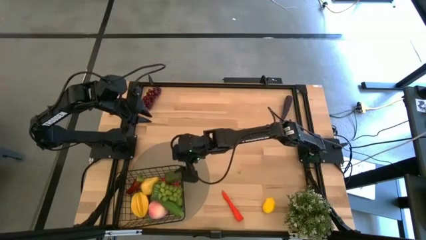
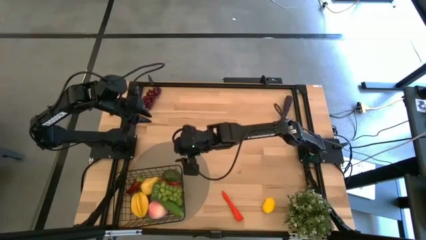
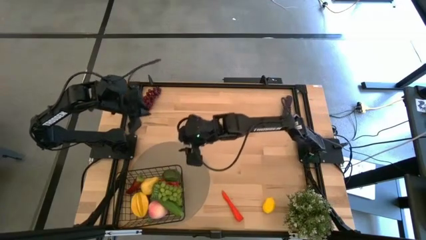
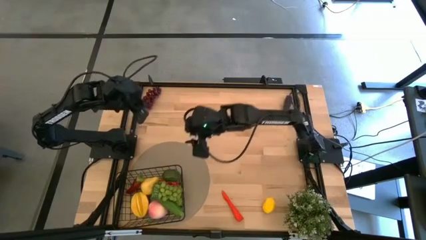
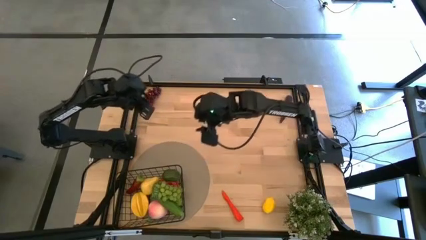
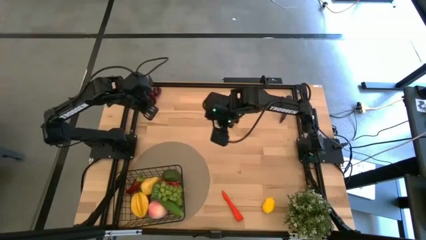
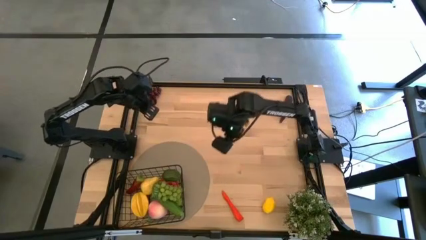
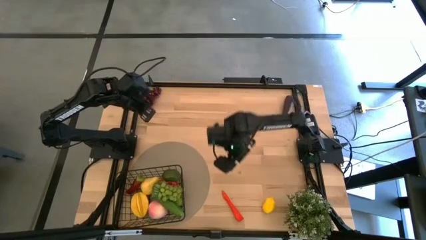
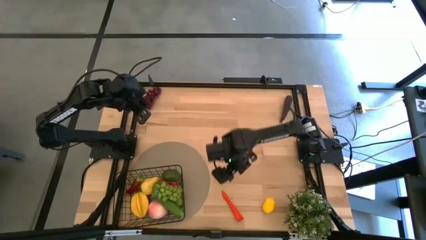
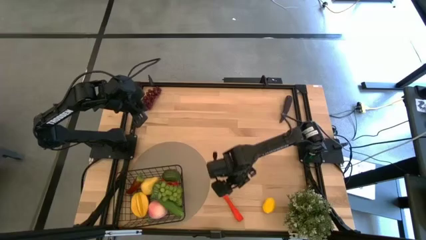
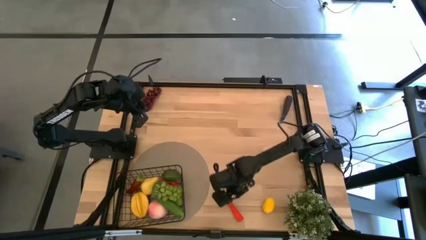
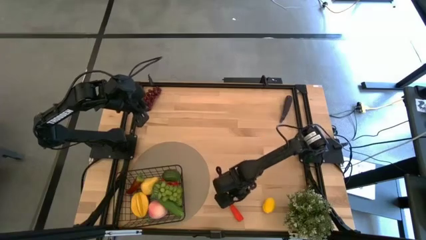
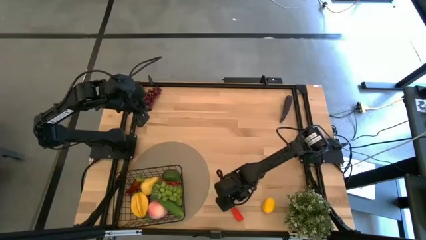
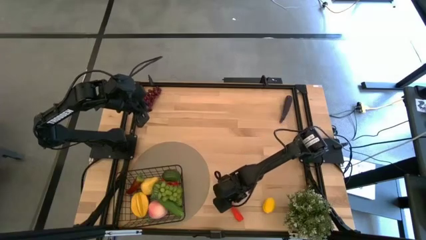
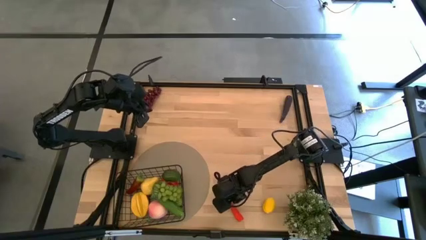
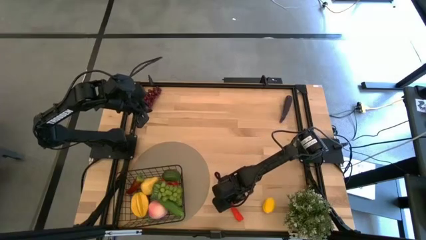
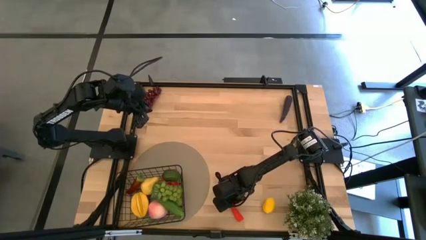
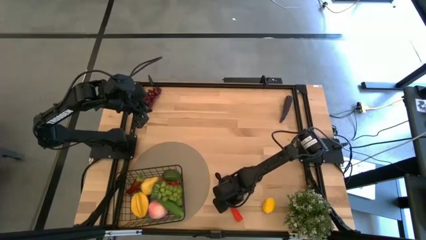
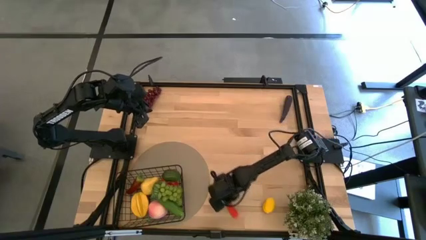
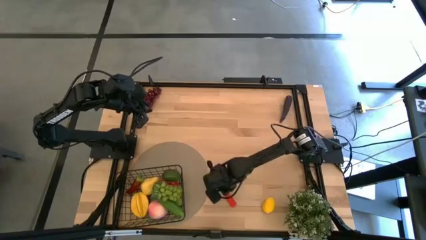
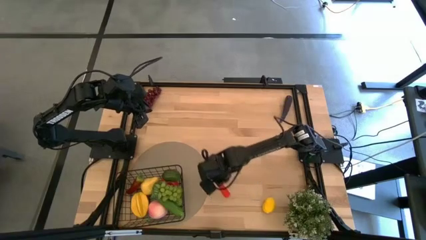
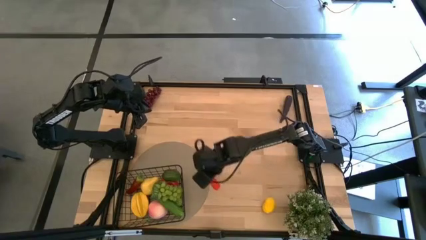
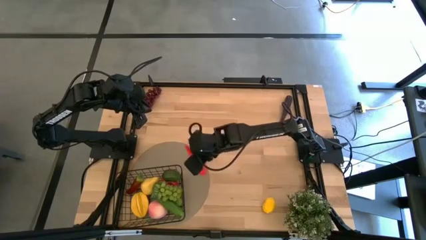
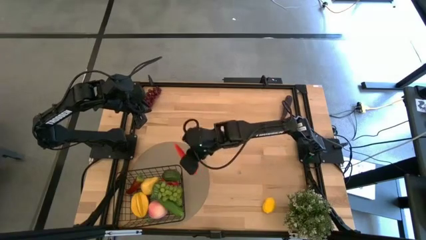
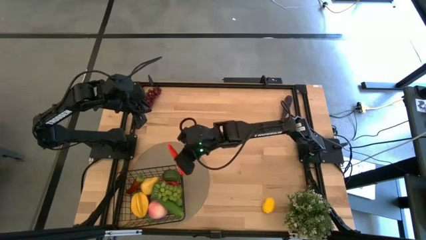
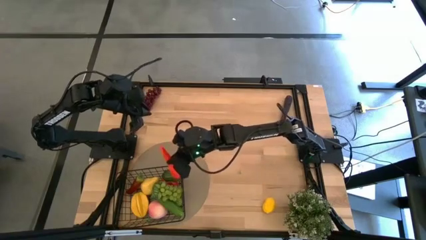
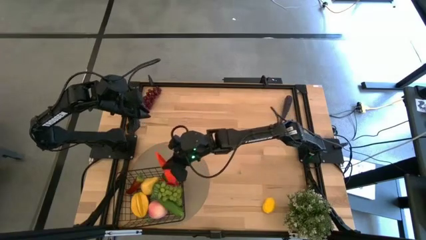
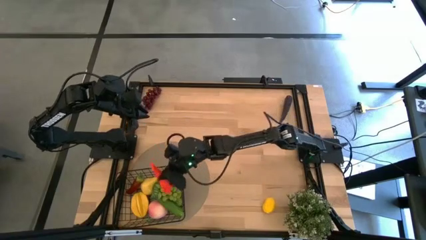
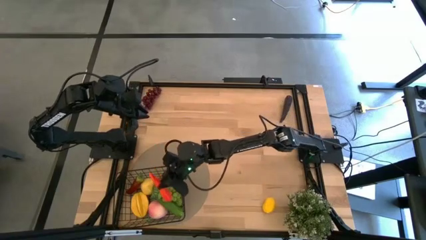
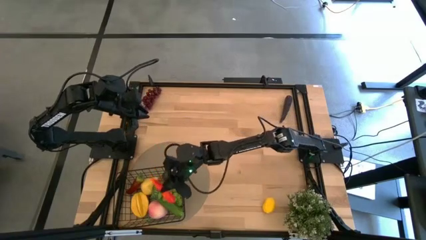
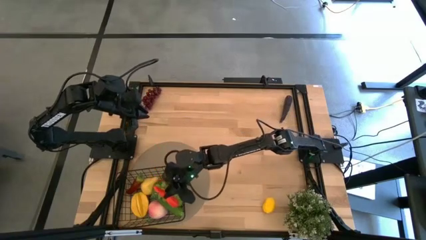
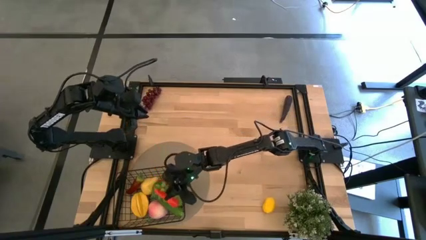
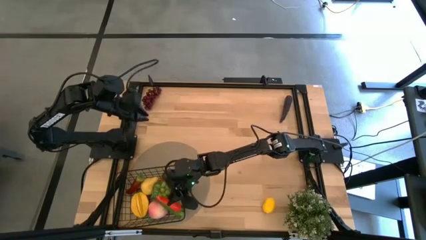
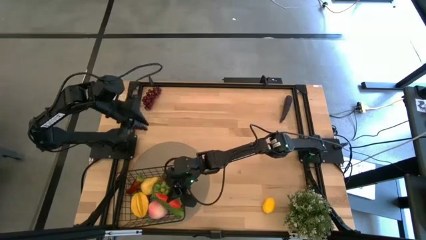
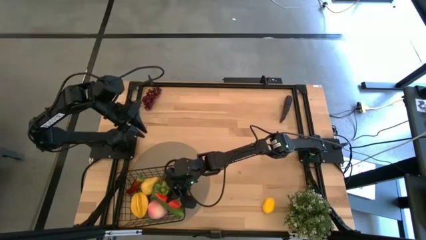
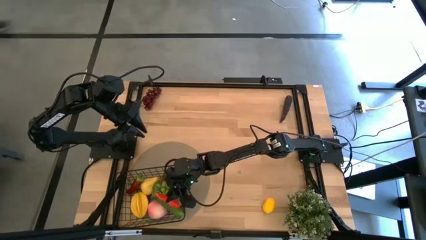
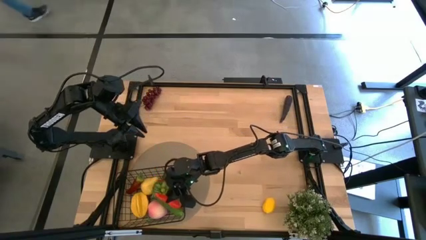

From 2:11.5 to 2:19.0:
Task: Build produce basket
Put the orange carrot into the wire basket

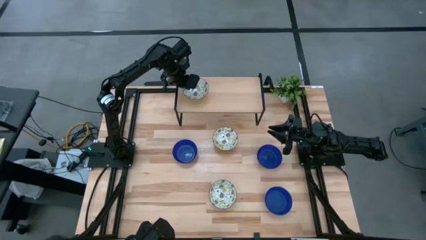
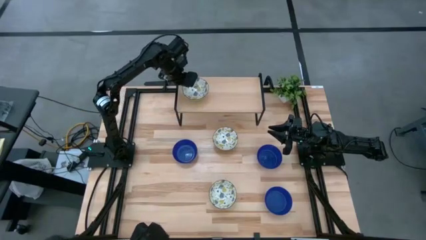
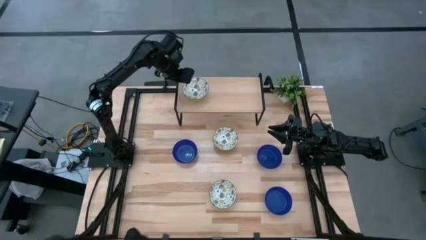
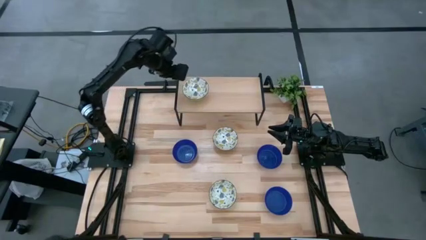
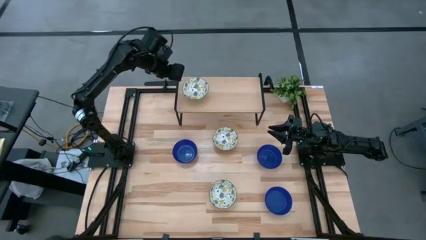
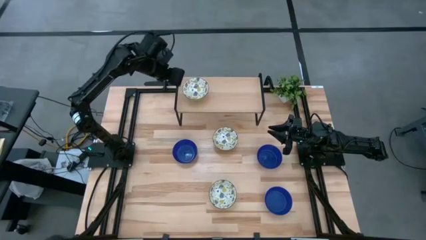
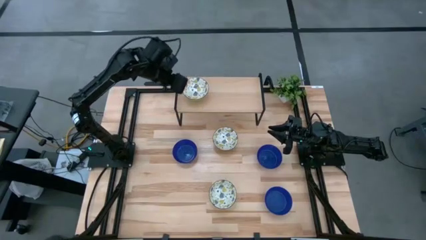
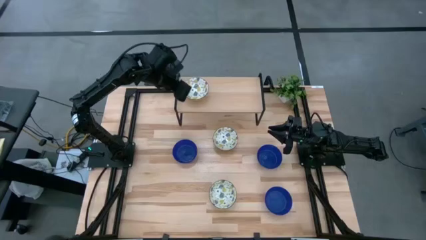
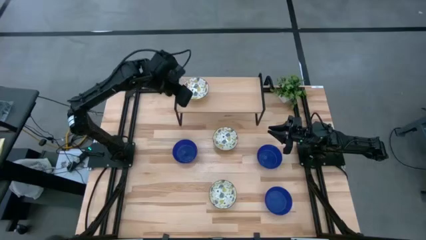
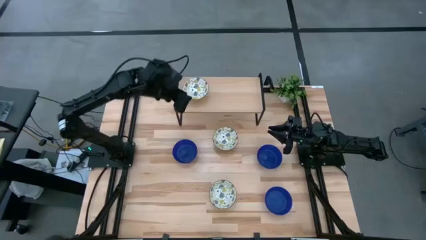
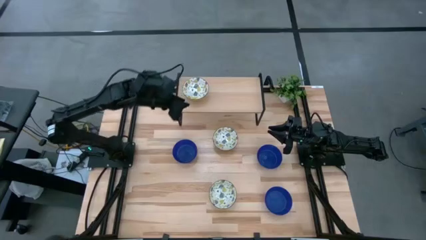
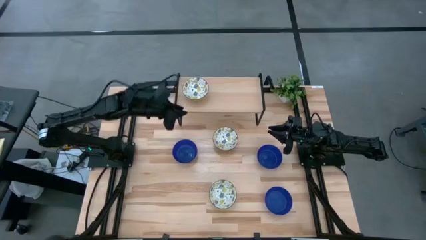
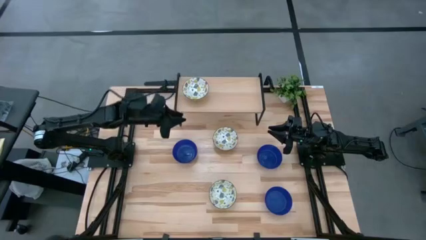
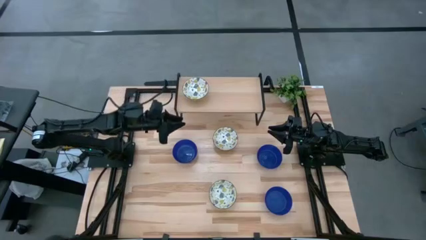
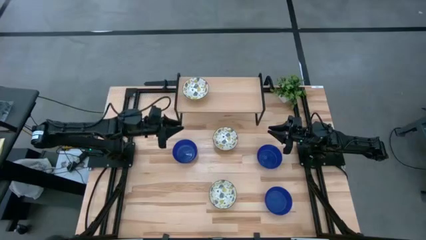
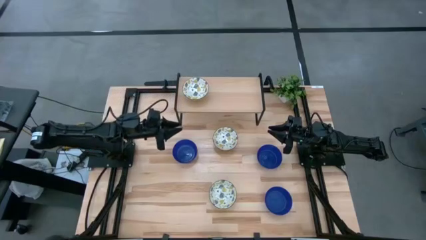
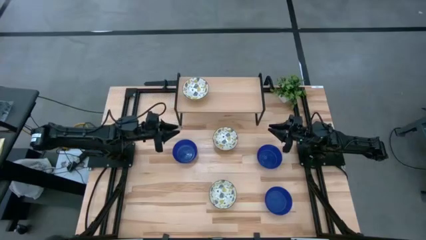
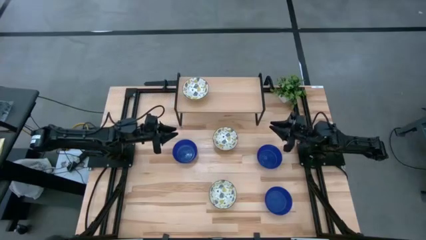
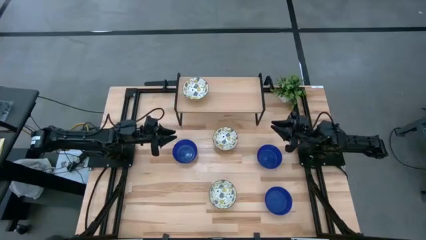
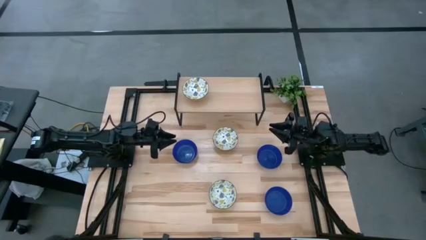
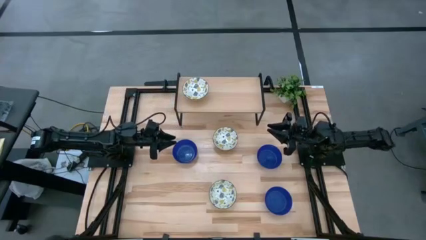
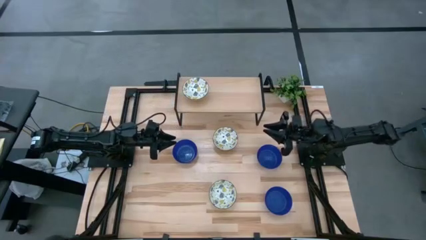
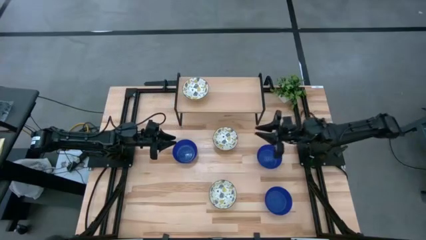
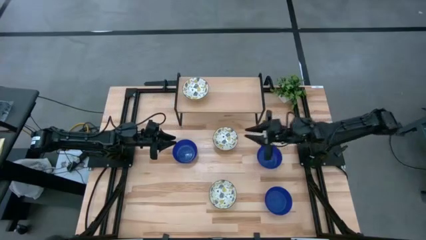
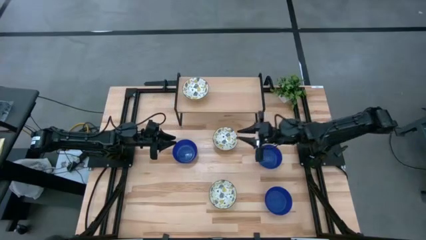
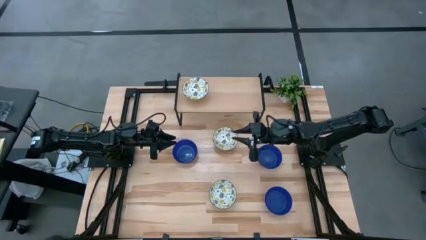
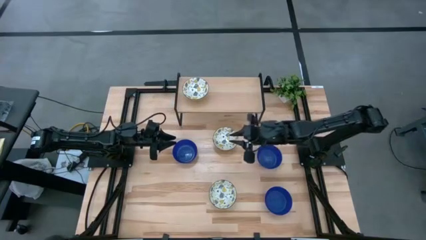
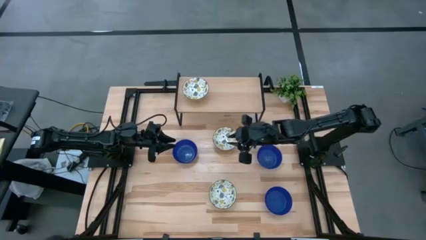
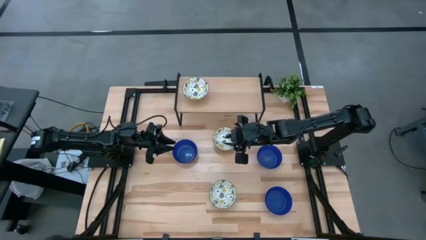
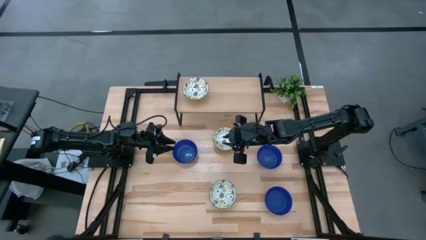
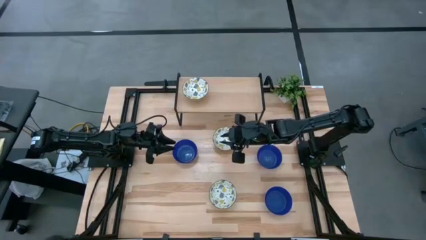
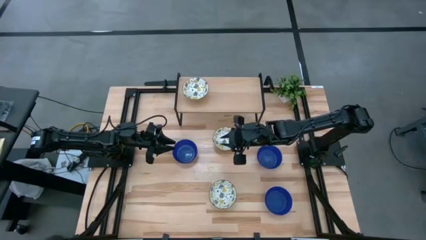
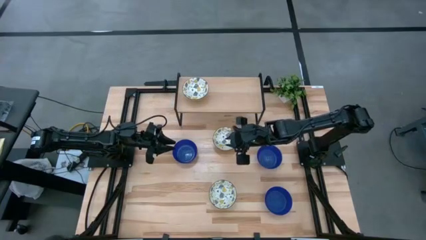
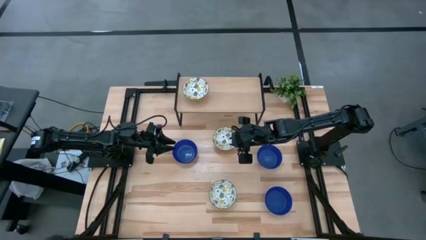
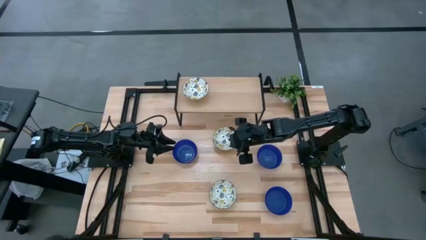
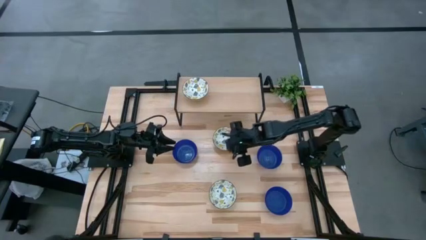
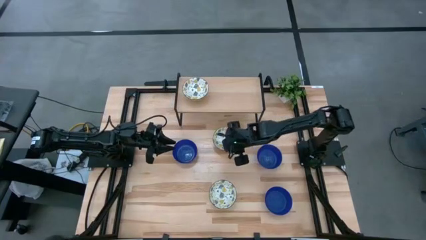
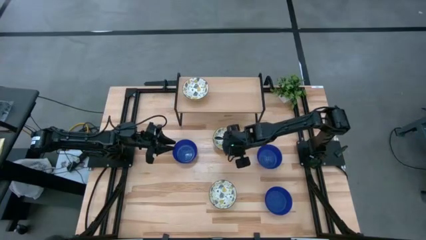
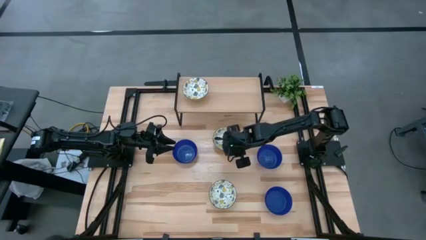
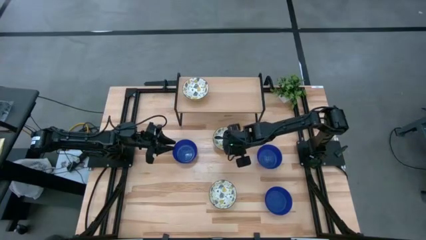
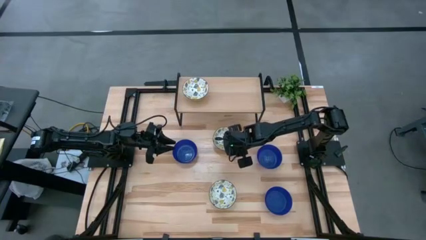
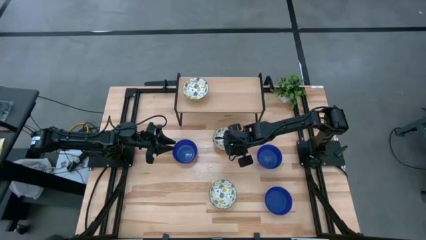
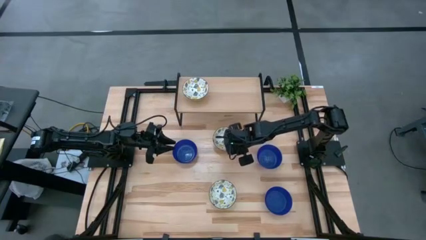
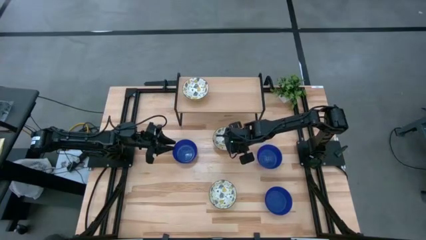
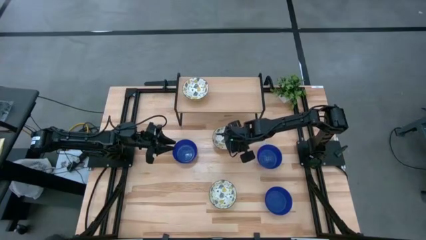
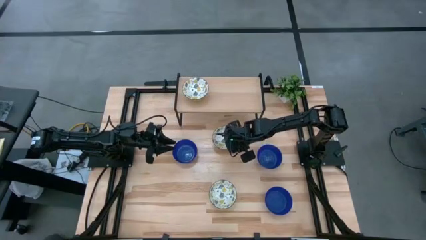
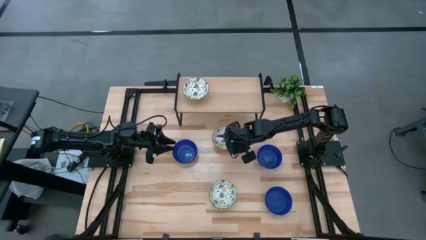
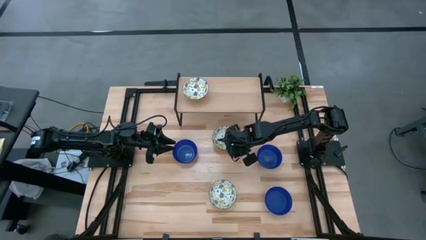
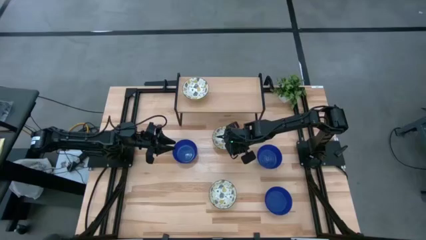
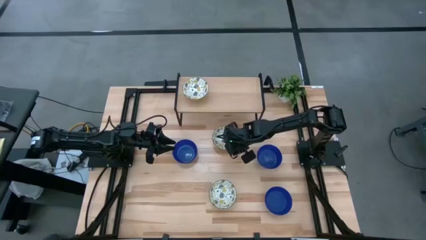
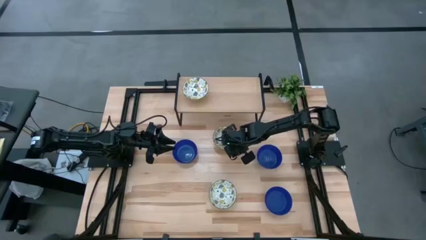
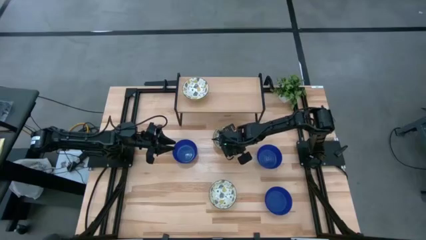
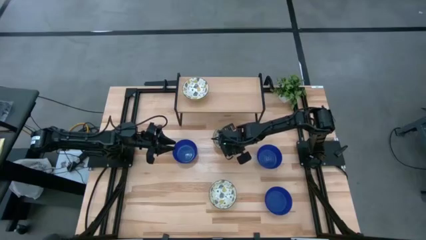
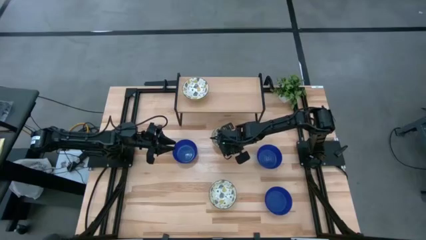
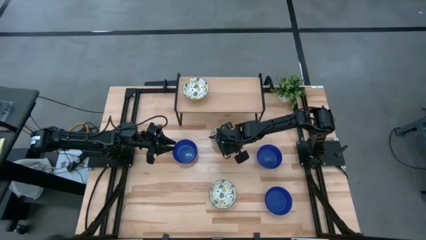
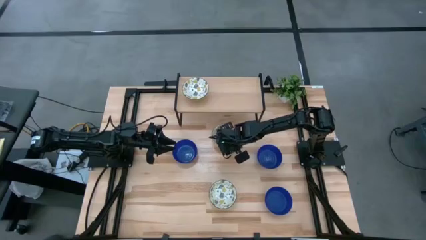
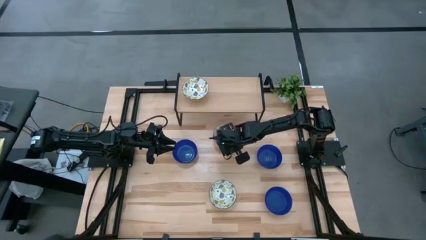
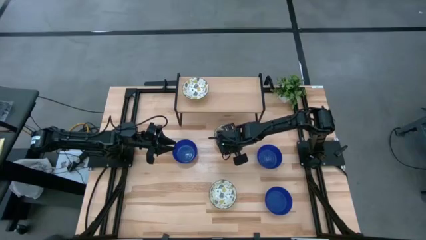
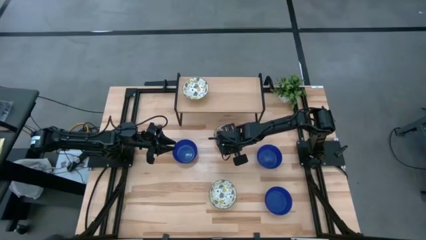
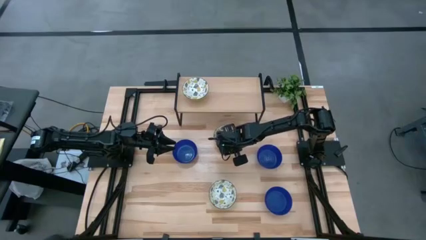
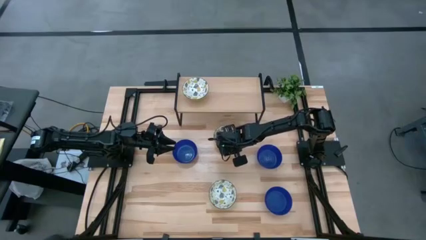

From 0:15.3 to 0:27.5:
Task: Pick & Place Mini bowls
Stack the top yellow bowl on the yellow bowl on the shelf
